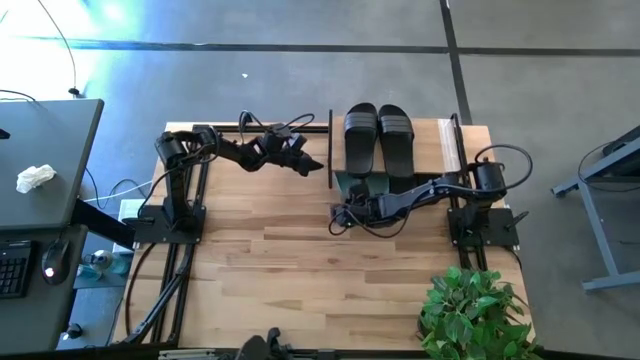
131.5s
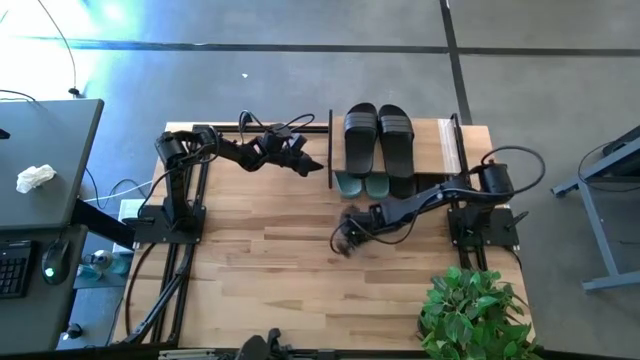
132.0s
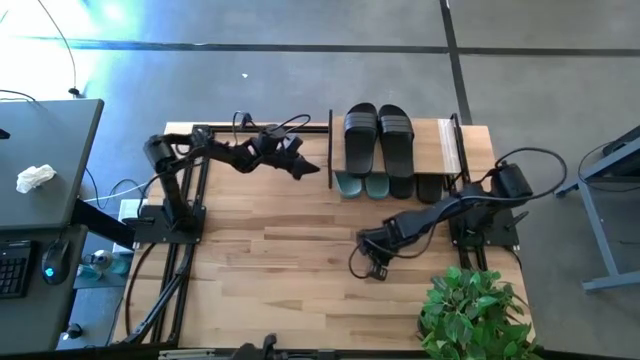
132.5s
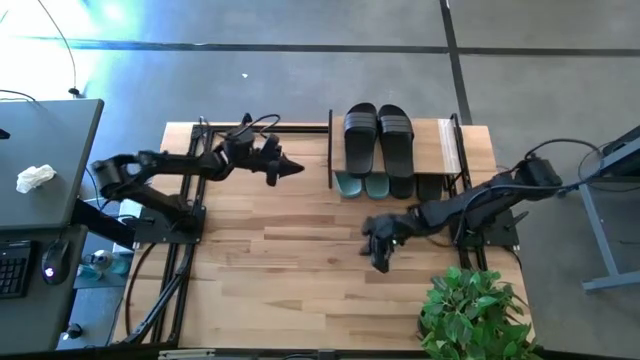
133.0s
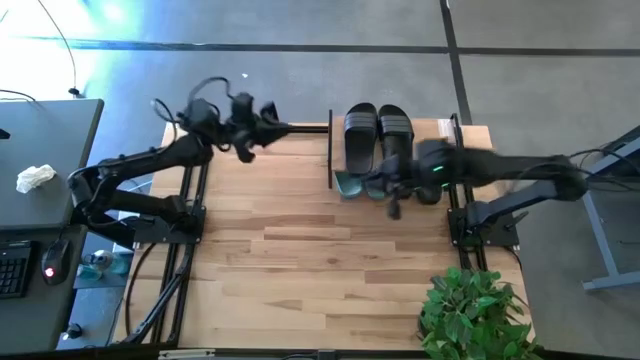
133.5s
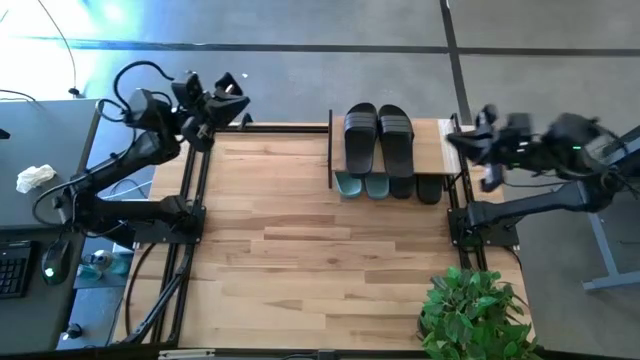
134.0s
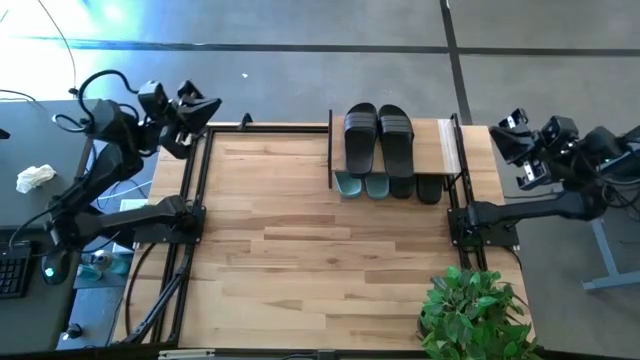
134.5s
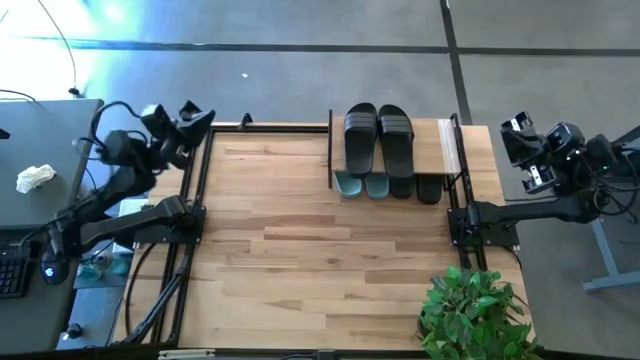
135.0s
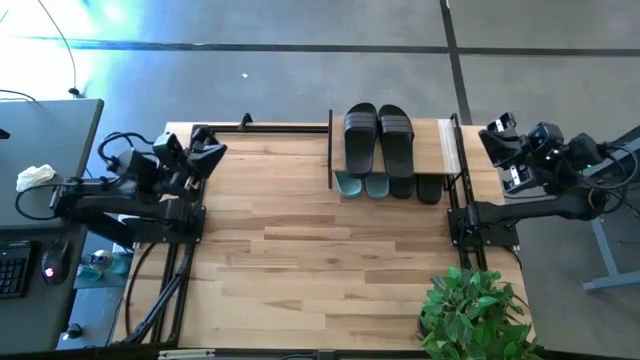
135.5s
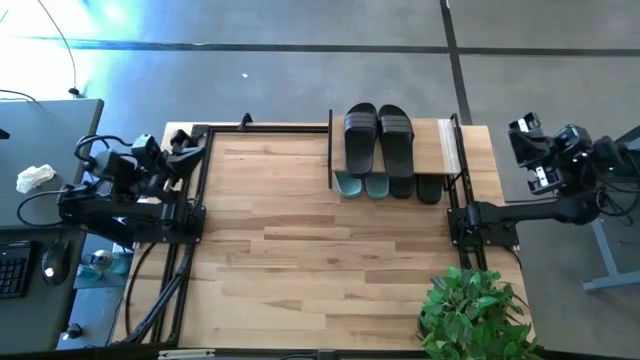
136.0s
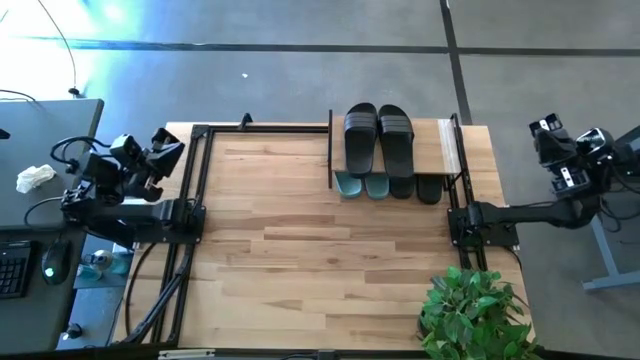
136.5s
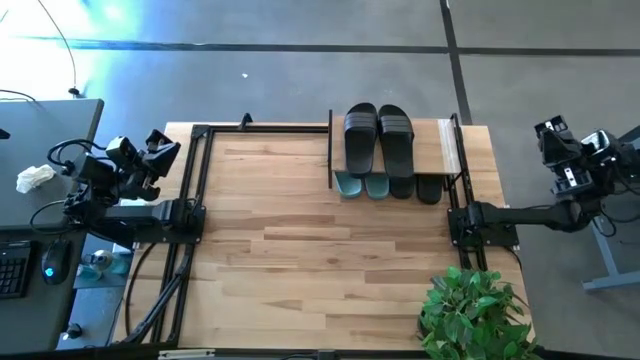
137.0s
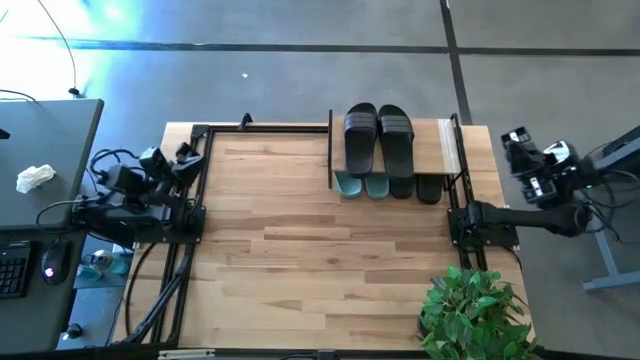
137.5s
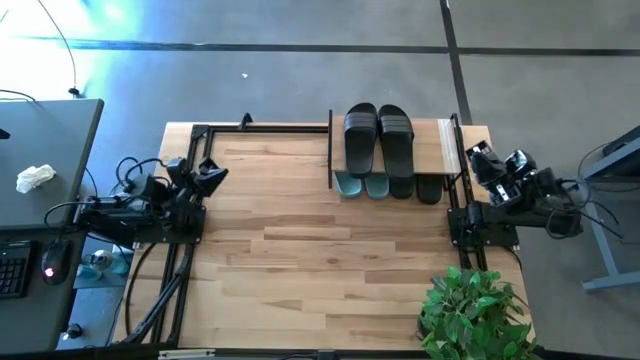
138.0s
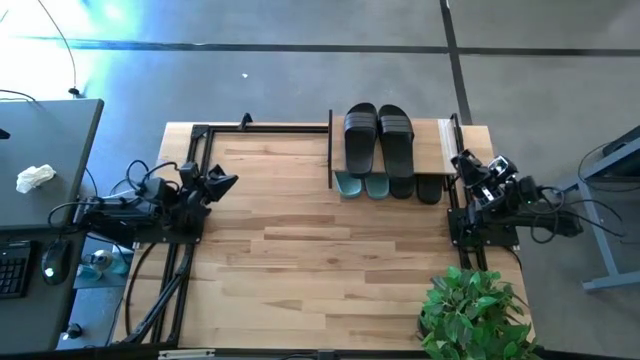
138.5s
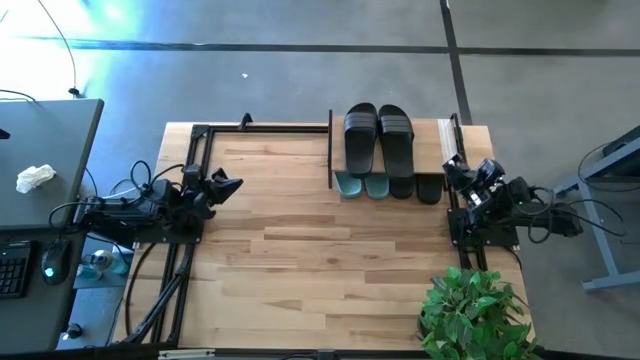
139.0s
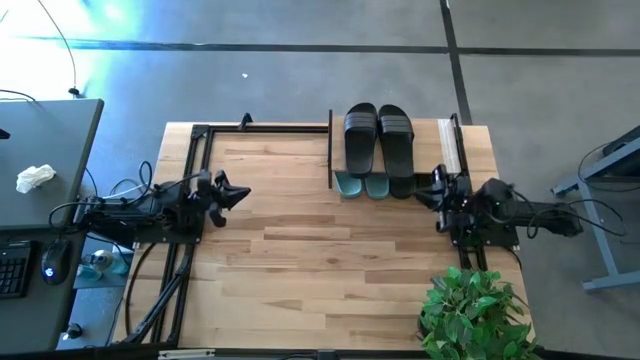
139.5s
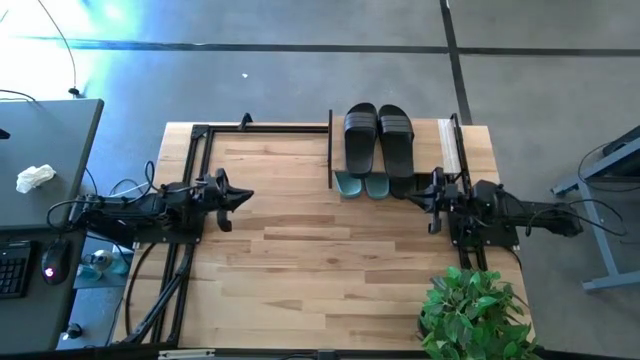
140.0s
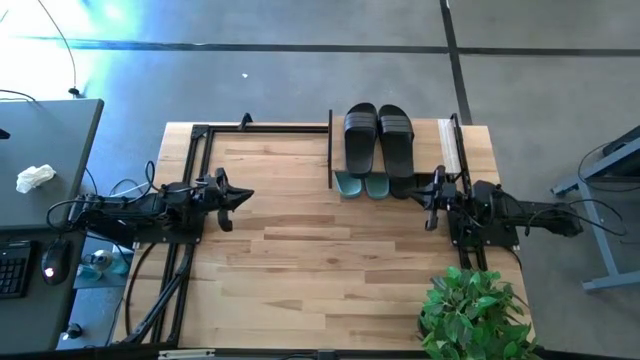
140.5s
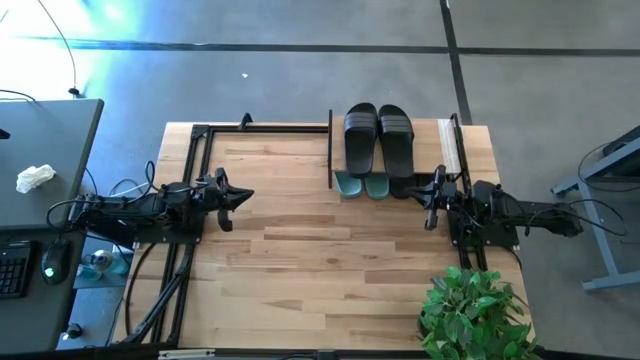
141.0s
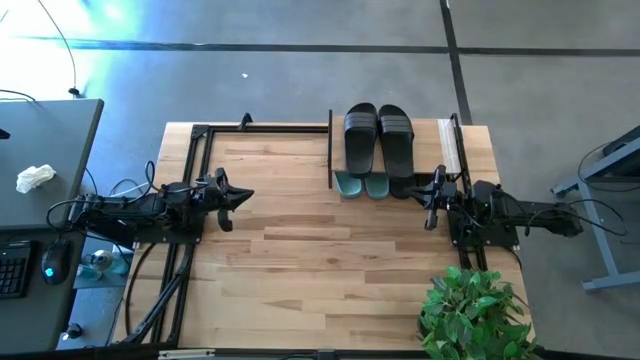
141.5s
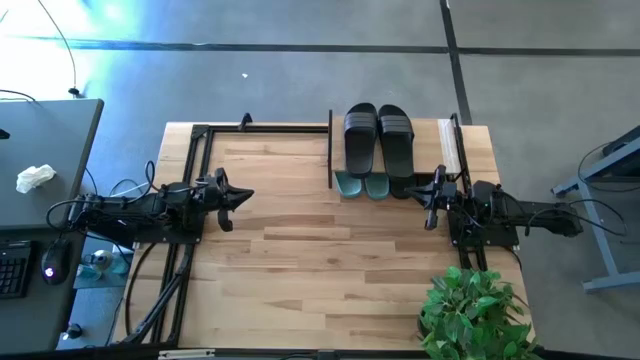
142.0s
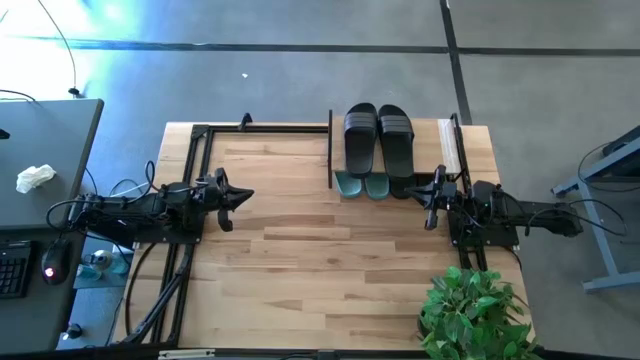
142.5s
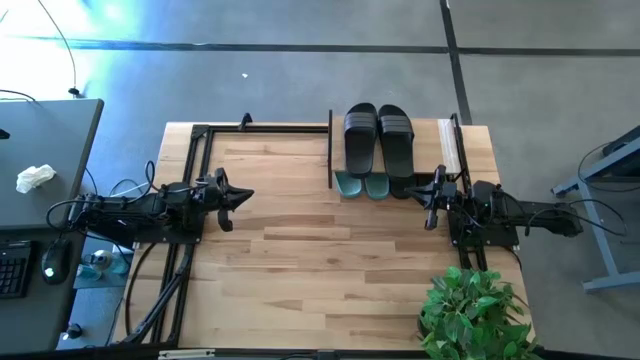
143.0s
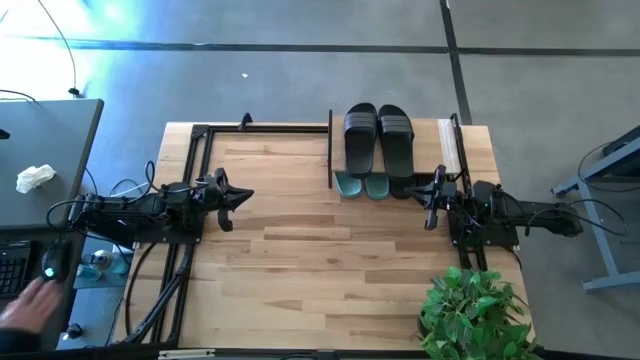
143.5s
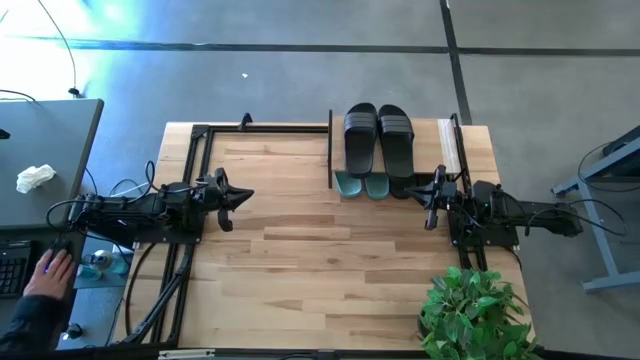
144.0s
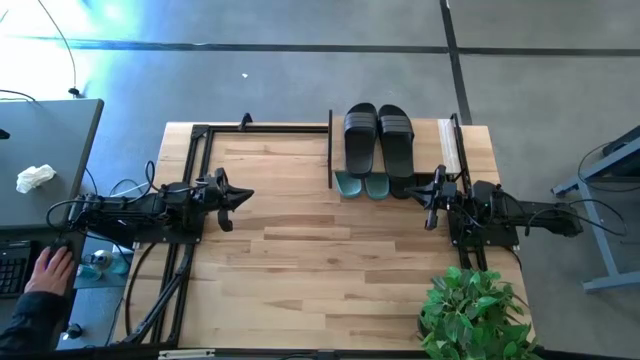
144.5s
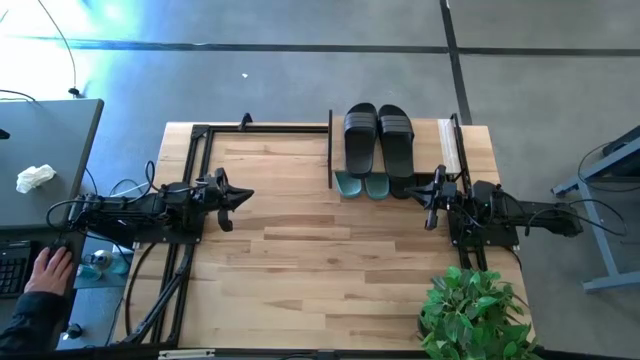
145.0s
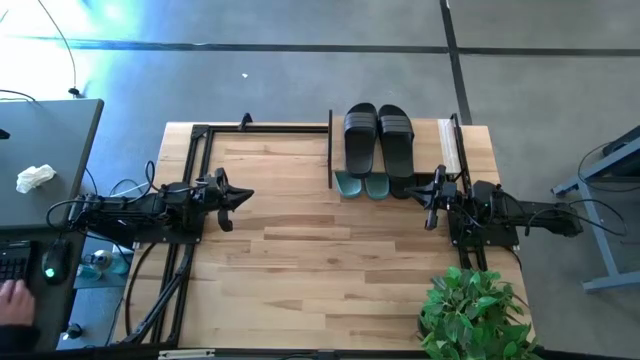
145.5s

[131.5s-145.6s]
Task: Pick and place slides into the shelf
Return to Home Position

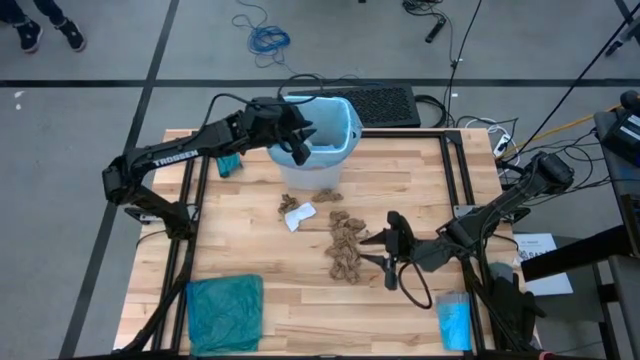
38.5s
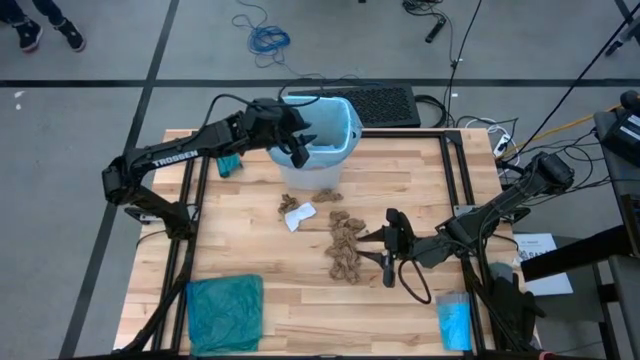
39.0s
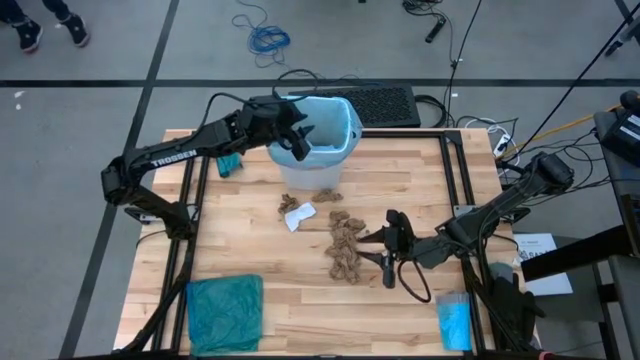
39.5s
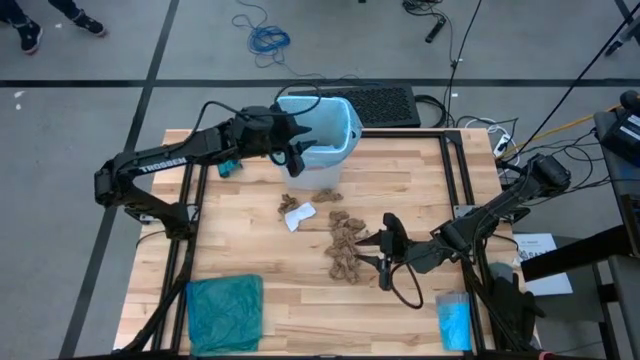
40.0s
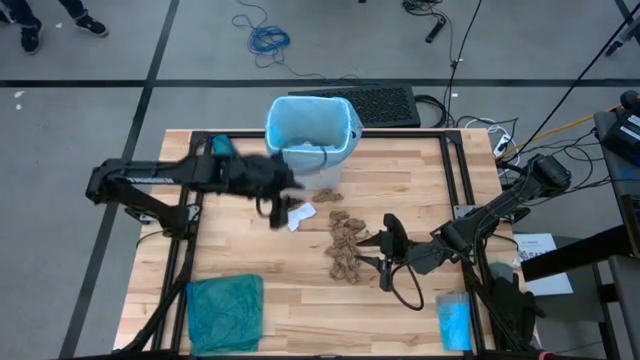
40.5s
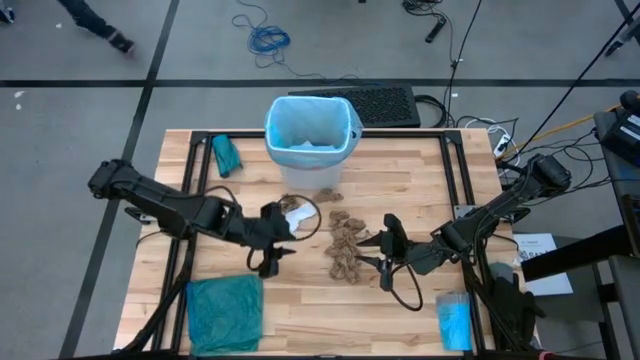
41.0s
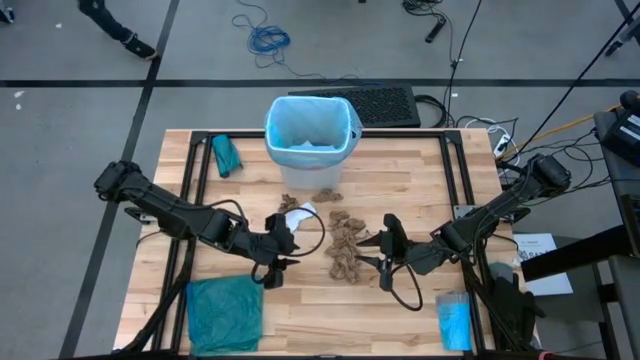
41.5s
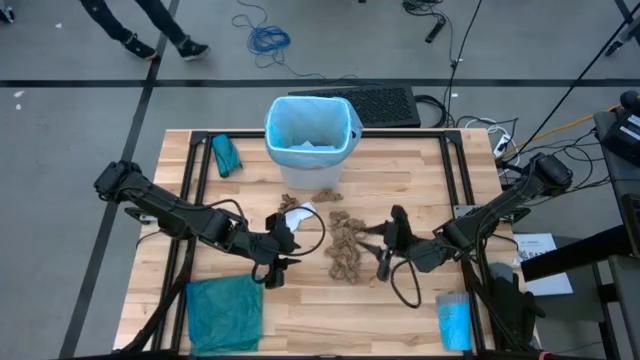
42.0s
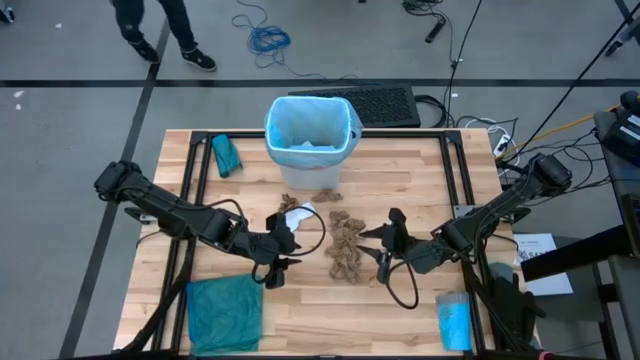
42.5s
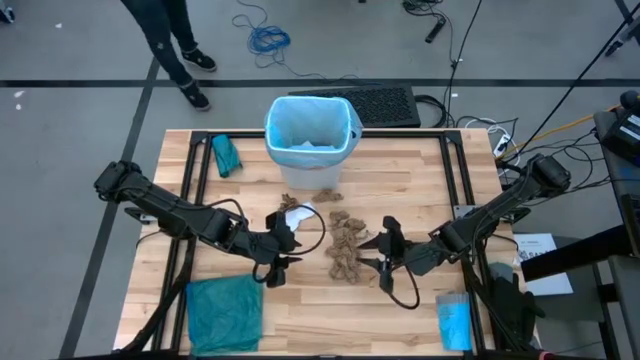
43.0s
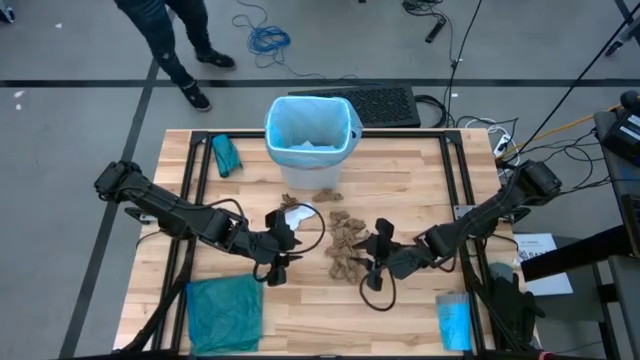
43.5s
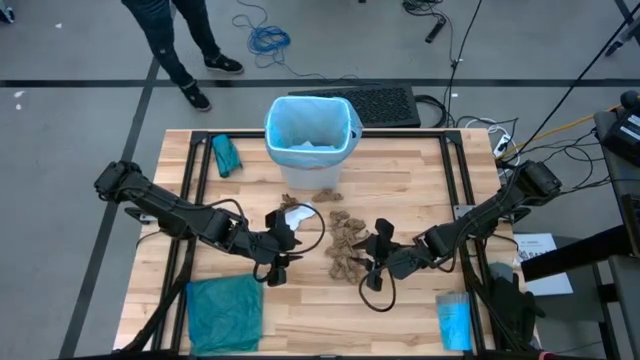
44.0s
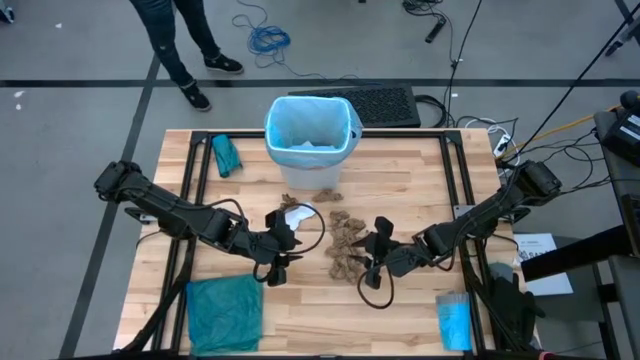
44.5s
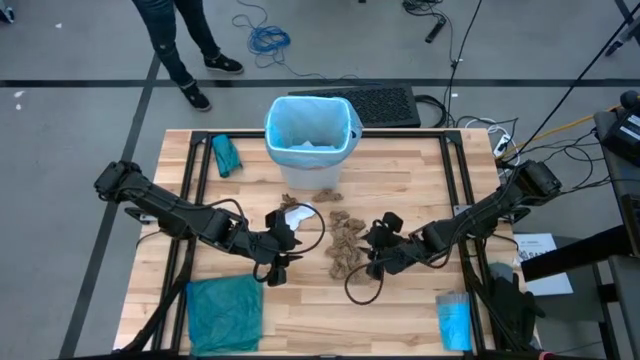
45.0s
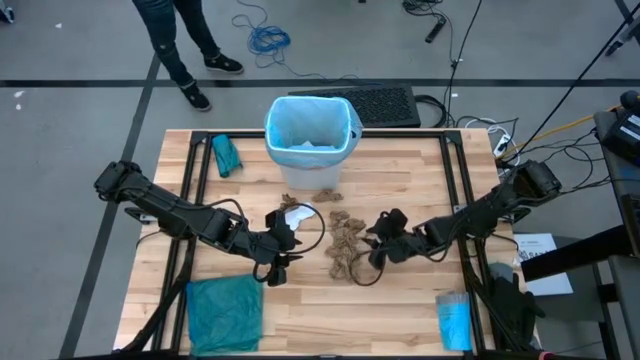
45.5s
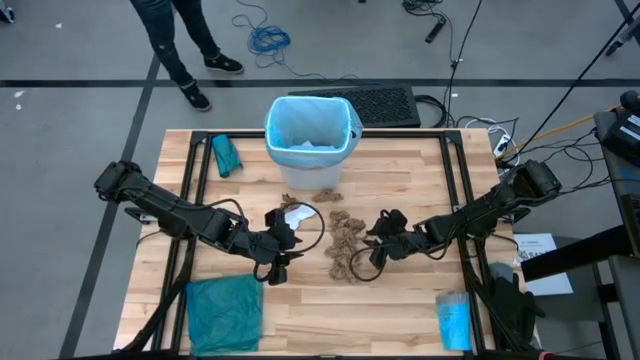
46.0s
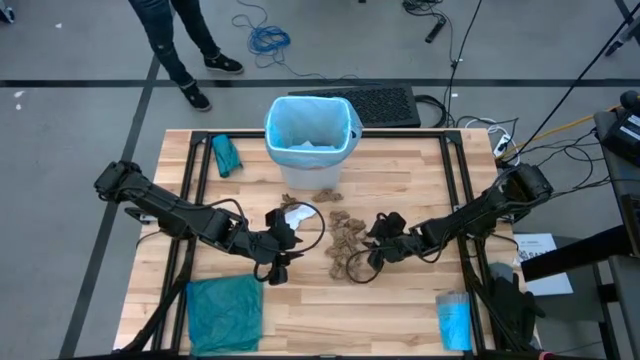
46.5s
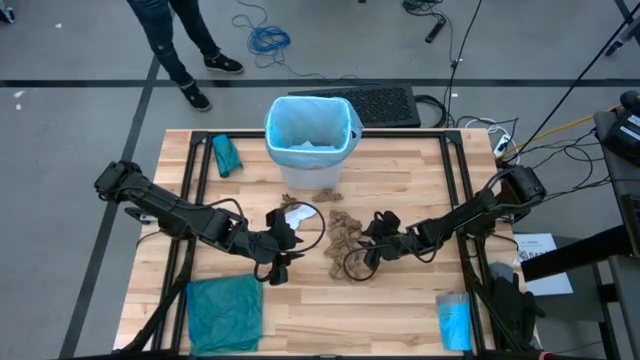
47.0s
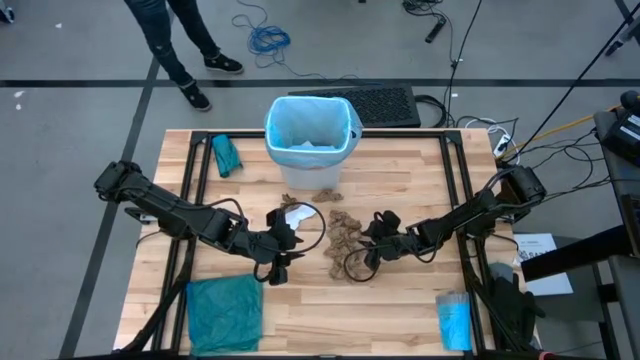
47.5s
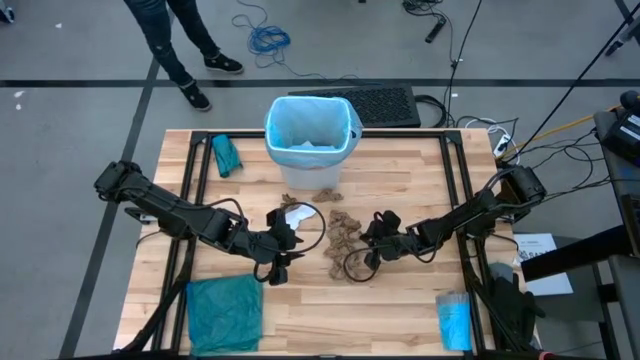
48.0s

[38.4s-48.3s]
Task: place trash/remove bag and relplace
Put the brown paper into the blue trash bag inside the white trash bin
